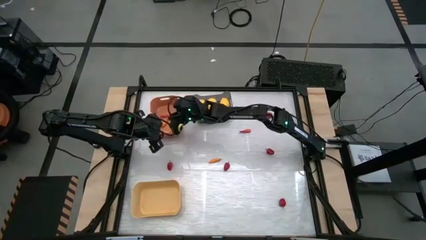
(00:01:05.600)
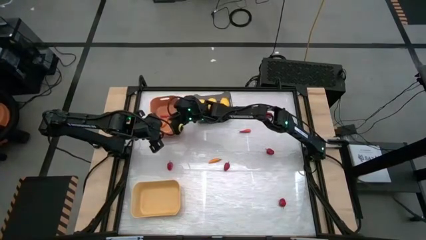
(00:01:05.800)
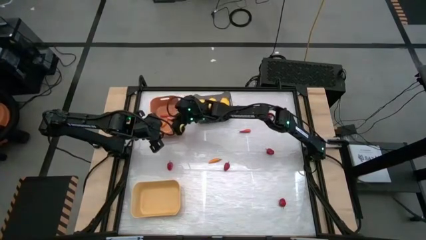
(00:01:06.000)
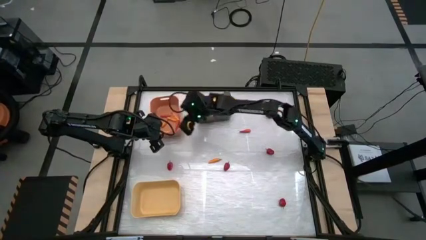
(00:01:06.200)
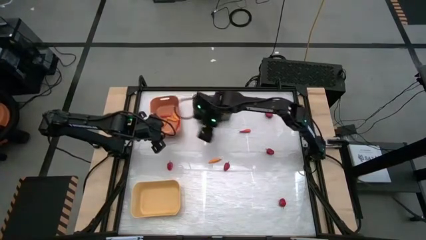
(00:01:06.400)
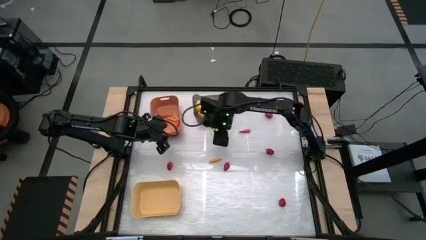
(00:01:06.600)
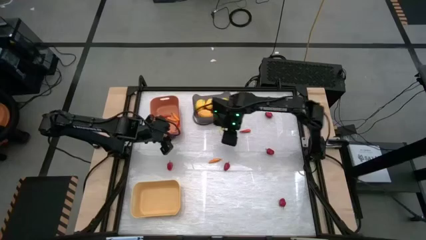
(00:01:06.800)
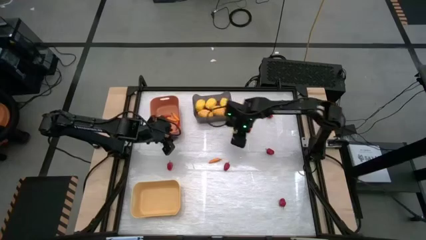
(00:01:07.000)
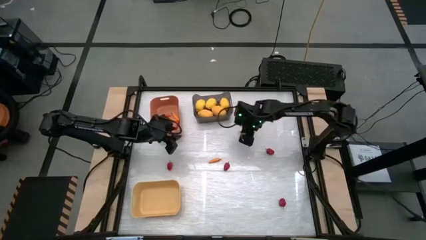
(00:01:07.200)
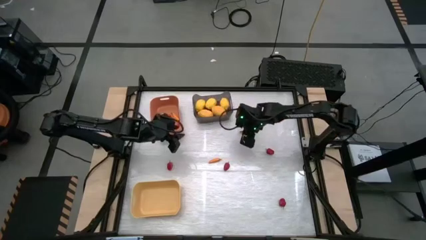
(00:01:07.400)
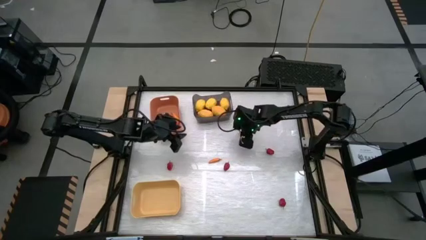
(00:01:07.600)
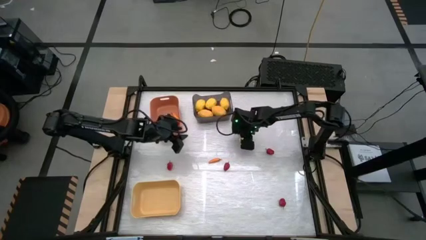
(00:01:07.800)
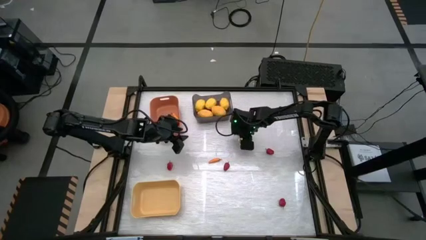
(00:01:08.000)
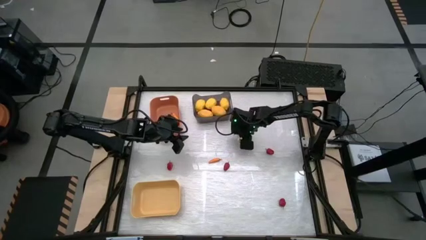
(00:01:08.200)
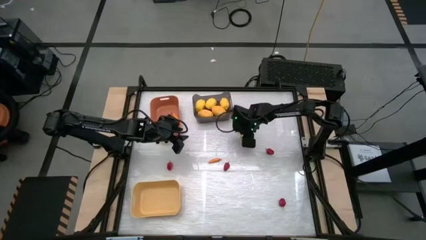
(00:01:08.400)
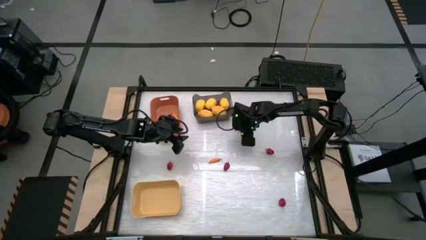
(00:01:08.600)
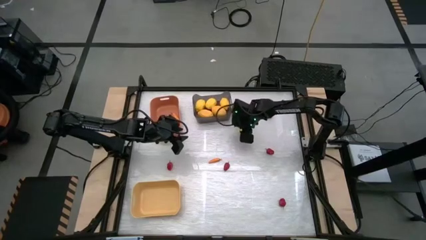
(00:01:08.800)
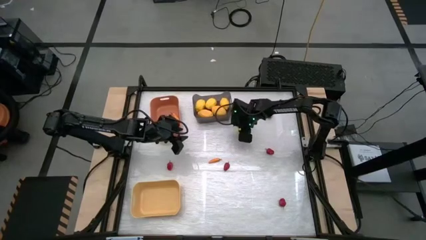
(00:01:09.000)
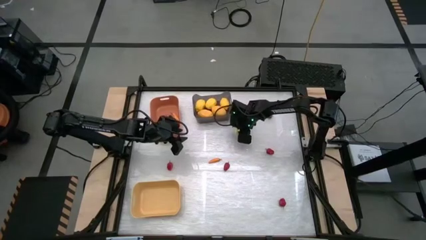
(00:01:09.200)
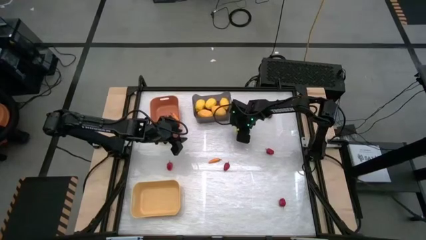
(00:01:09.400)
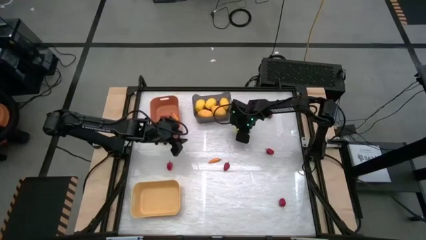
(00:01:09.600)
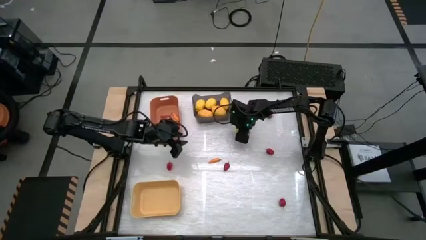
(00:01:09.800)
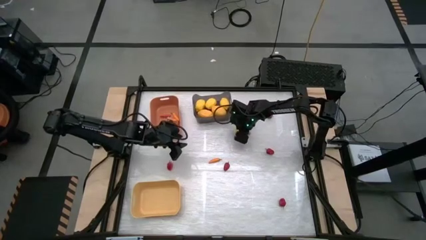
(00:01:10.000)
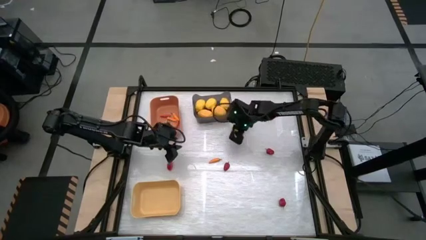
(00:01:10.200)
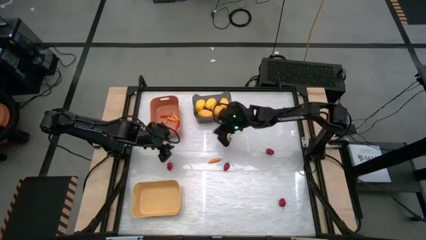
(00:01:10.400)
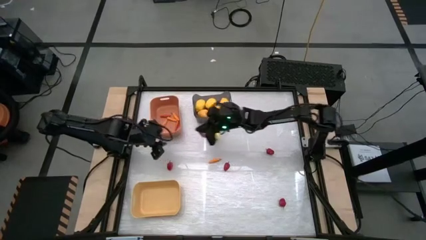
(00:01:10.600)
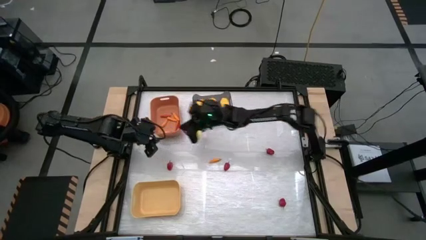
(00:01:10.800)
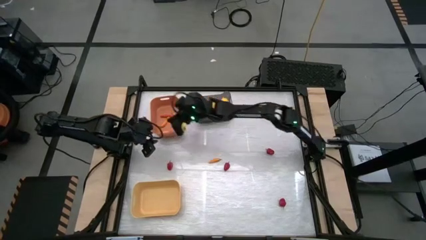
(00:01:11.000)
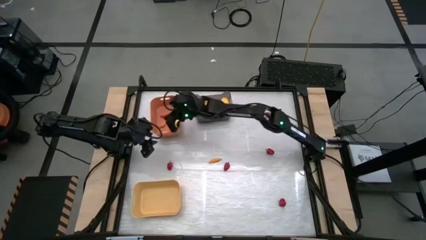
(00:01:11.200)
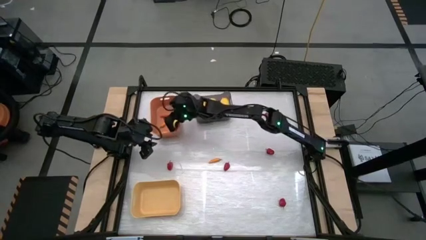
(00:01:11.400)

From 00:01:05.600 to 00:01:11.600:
Task: Sort produce into baskets
Put the orange chili pepper into the orange bin

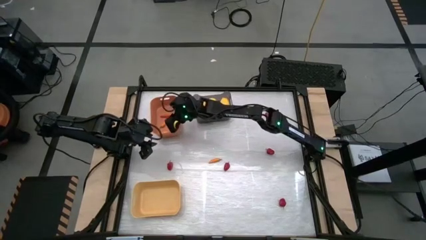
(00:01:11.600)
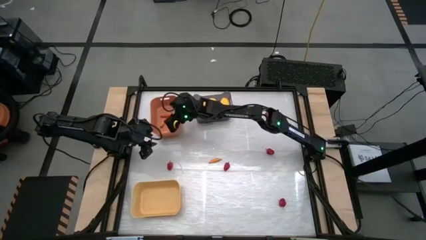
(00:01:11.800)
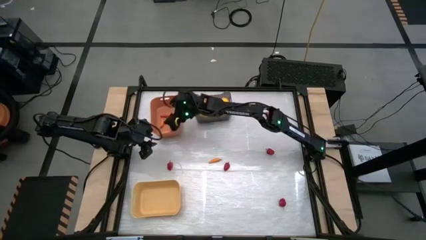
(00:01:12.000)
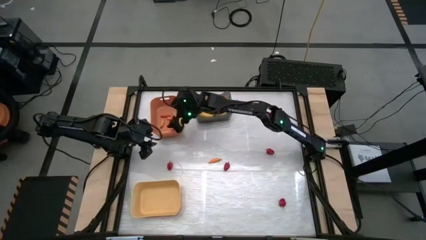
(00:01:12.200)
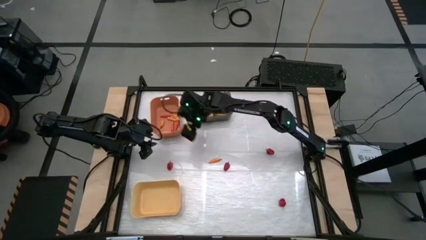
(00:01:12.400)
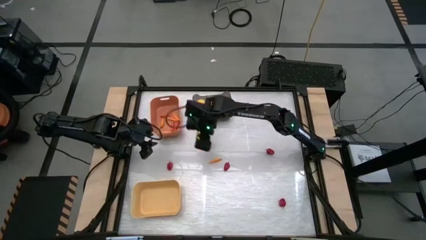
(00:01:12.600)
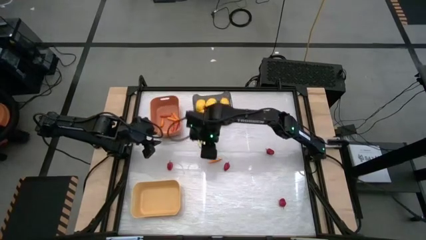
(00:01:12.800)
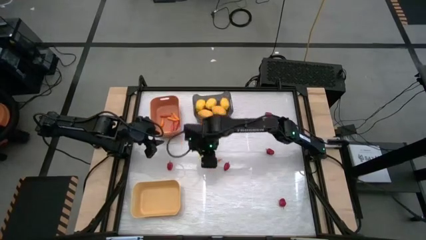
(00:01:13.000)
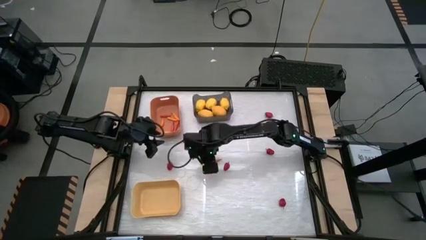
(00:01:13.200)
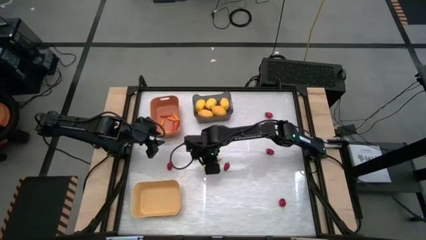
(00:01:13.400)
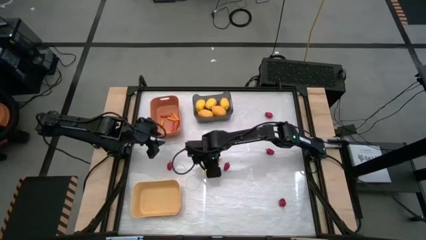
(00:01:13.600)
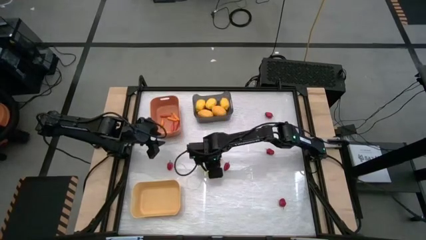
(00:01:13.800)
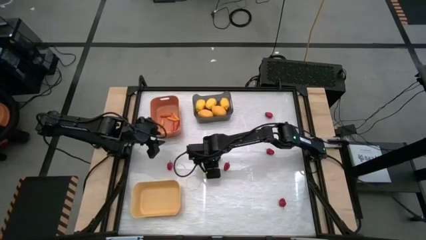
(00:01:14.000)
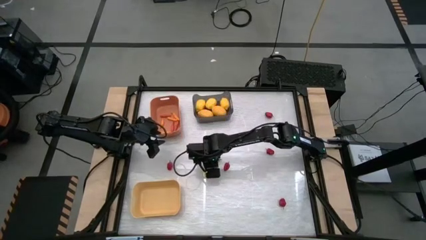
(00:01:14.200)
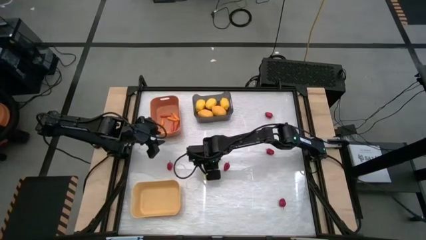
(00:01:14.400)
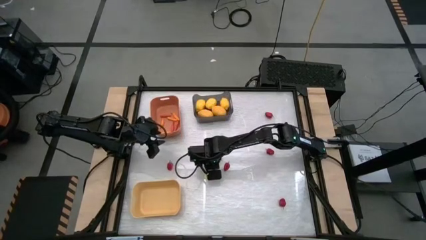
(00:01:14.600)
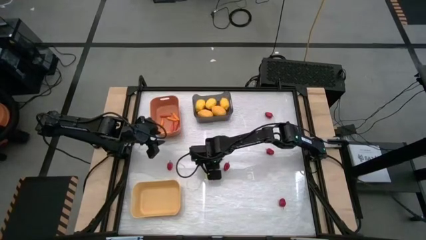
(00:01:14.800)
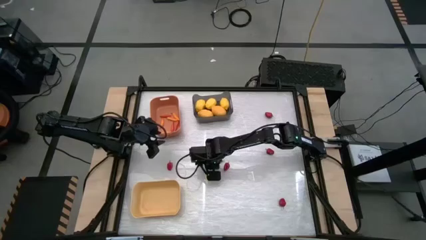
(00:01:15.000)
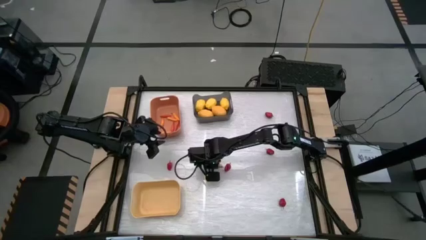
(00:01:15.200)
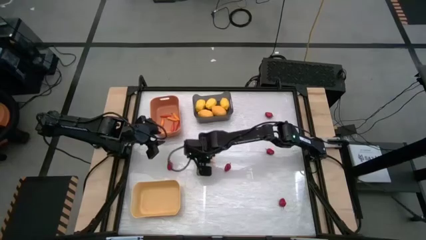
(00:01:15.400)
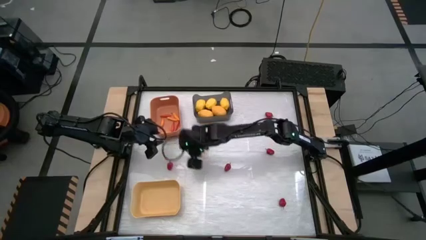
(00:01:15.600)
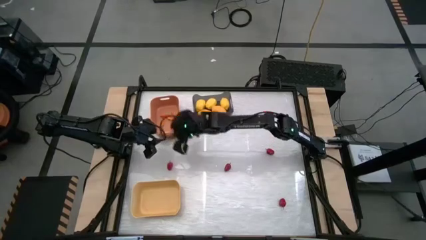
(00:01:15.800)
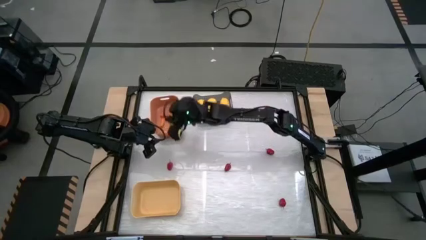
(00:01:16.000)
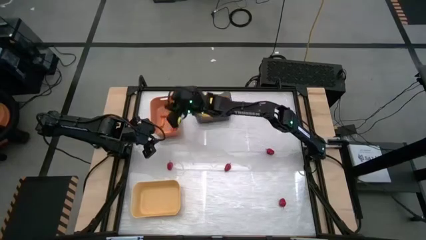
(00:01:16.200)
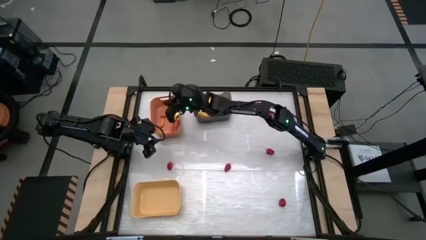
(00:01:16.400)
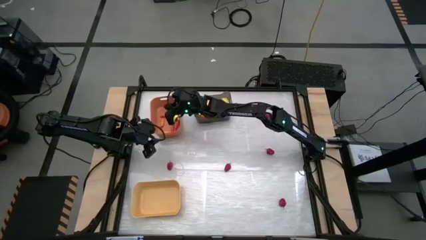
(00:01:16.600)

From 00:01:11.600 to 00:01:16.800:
Put the yellow chili pepper into the orange bin

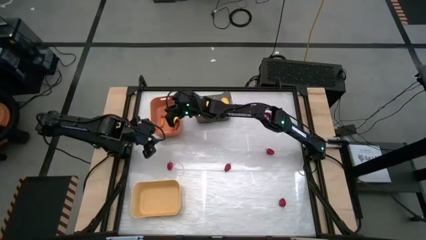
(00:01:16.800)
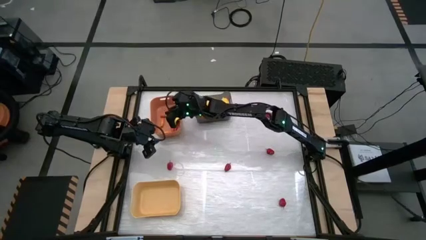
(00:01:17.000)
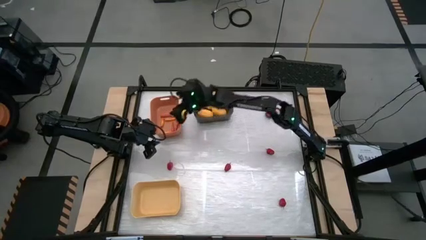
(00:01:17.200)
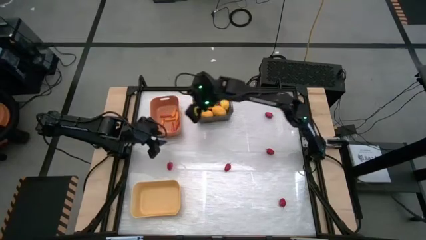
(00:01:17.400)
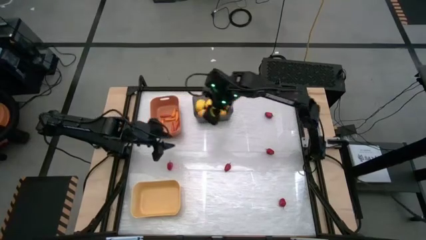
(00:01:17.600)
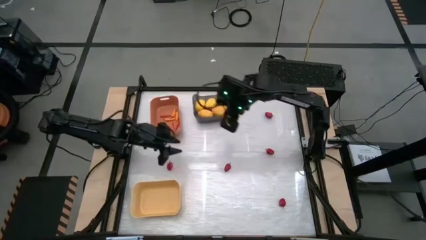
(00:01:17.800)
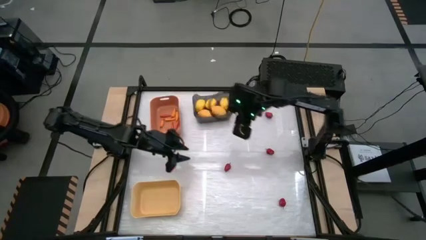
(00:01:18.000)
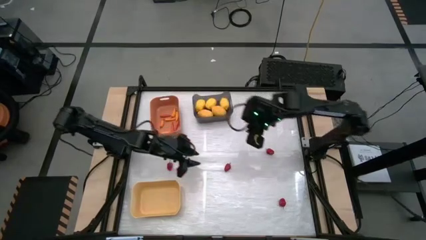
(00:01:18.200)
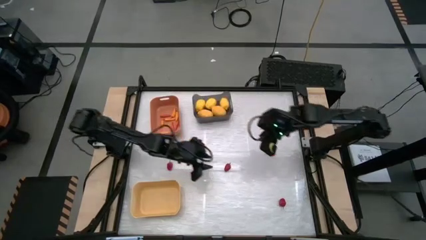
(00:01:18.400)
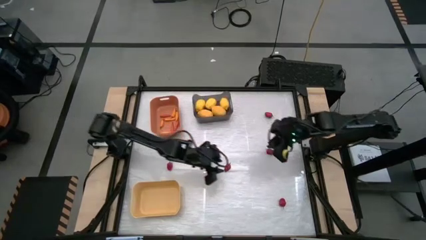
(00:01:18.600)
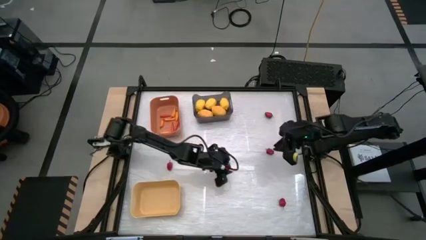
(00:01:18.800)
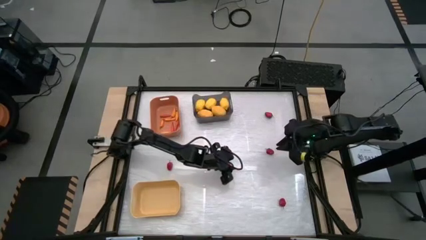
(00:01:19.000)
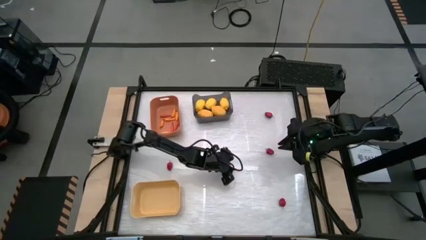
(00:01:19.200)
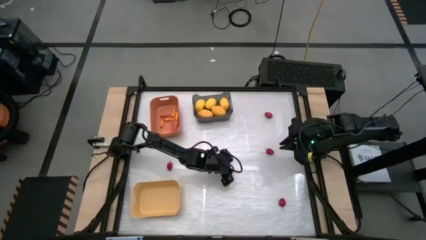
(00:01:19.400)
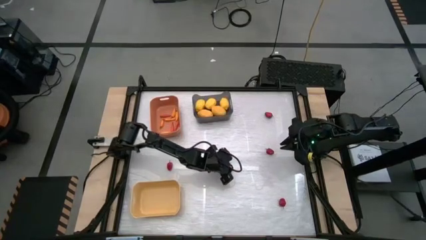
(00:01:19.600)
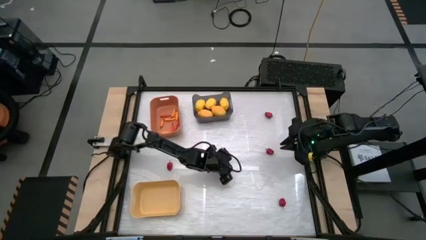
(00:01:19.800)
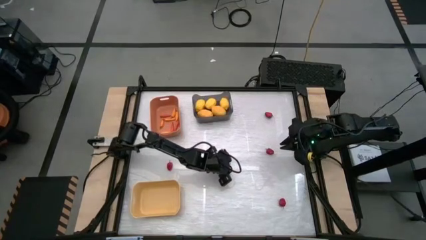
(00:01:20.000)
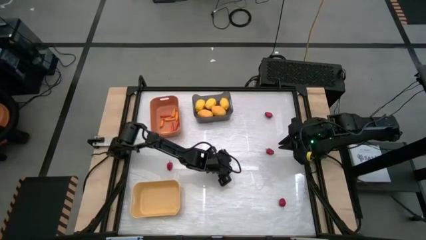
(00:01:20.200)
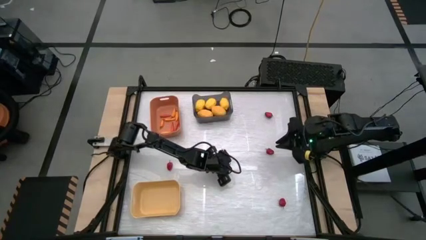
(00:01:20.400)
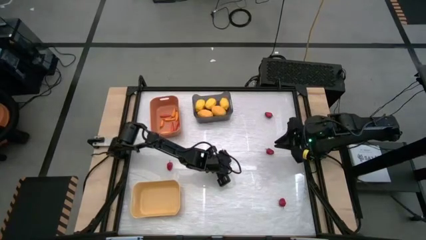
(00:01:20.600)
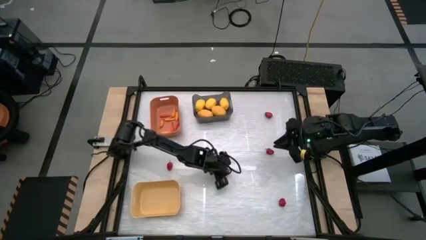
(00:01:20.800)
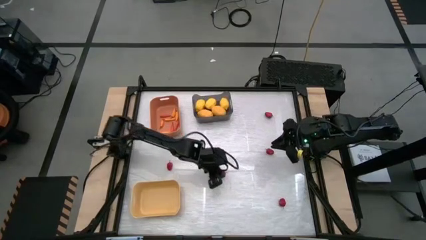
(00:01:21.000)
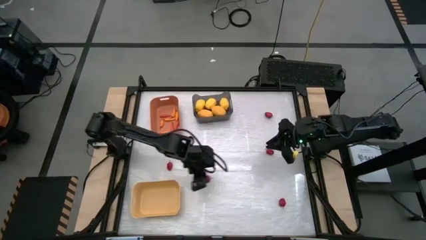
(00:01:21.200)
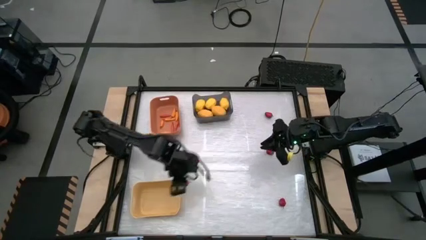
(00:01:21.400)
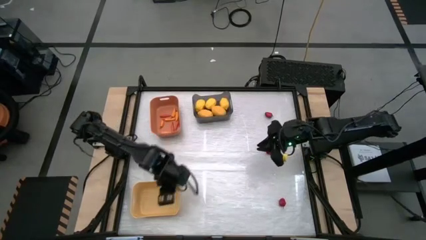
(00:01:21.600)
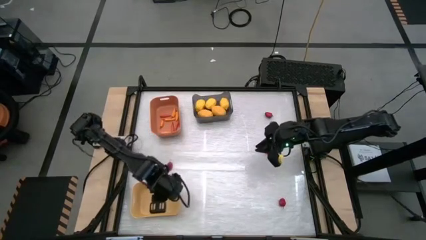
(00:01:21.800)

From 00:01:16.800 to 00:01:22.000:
Put the red chili pepper into the yellow bin
